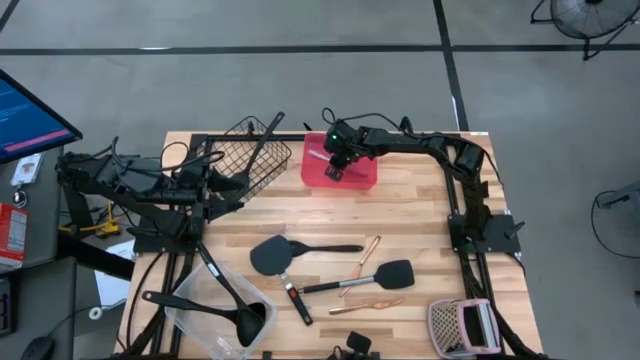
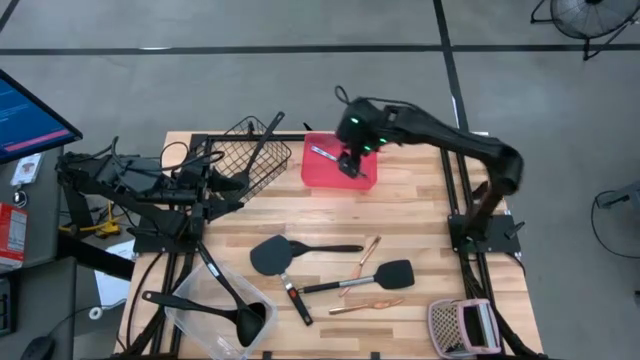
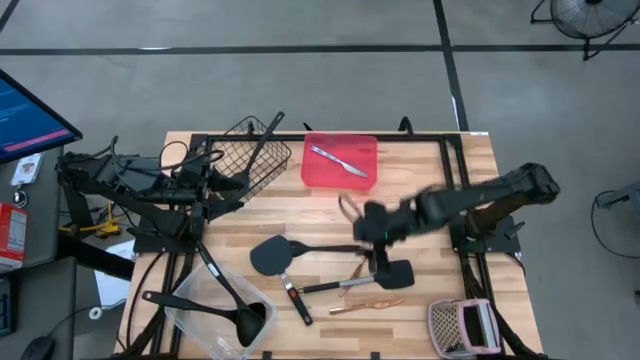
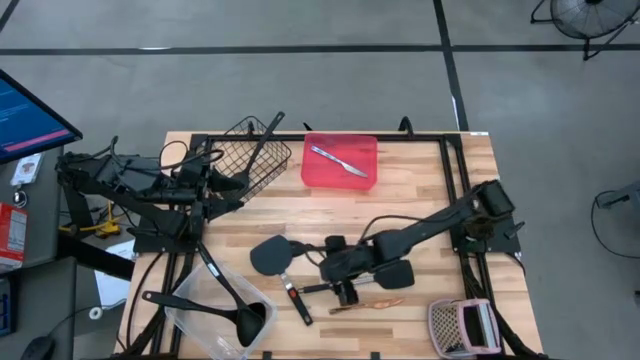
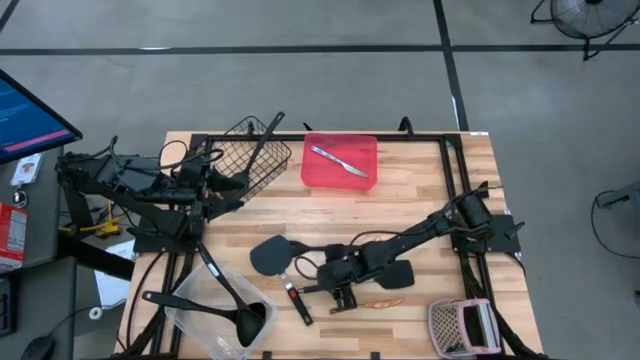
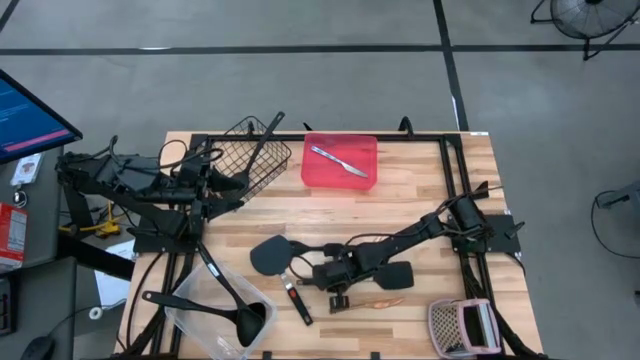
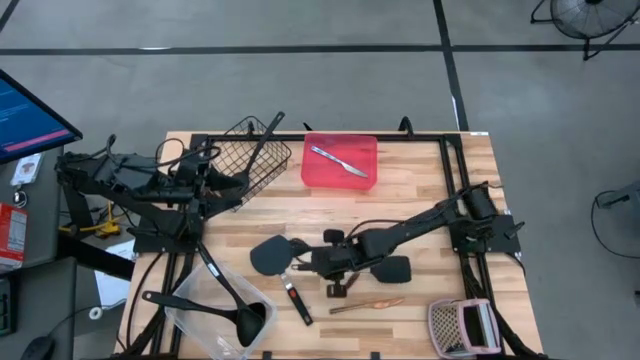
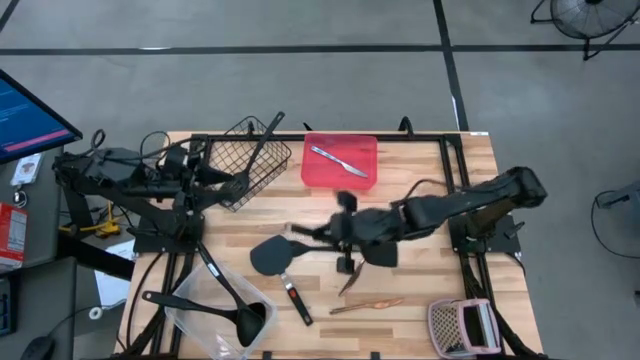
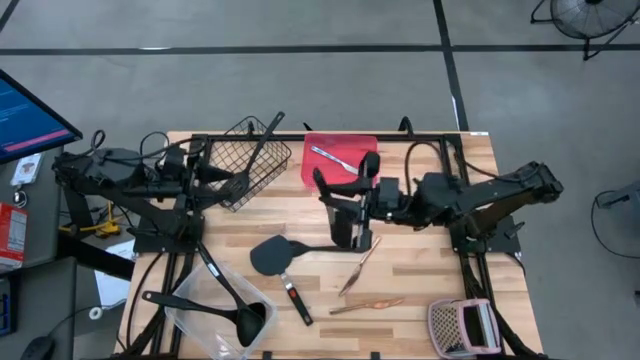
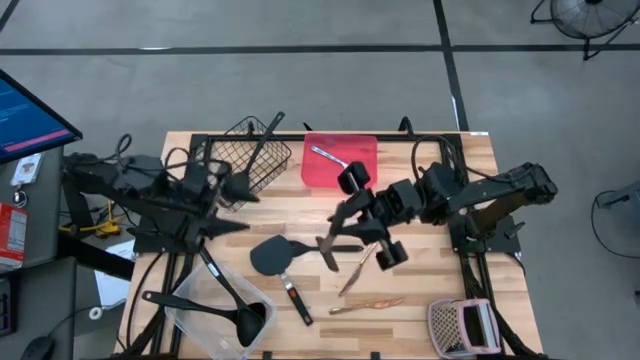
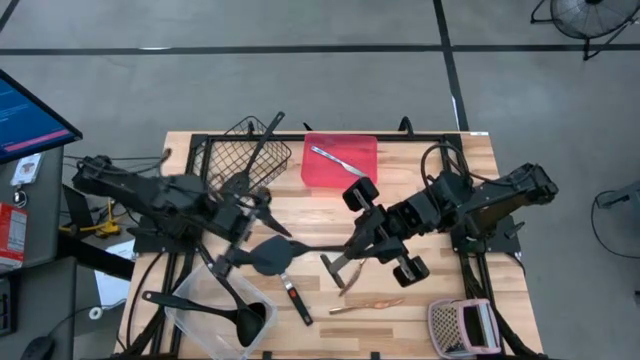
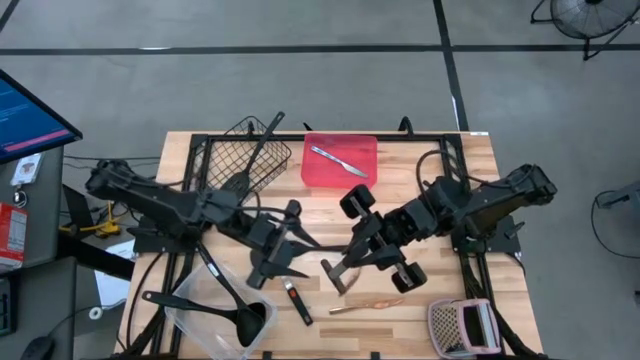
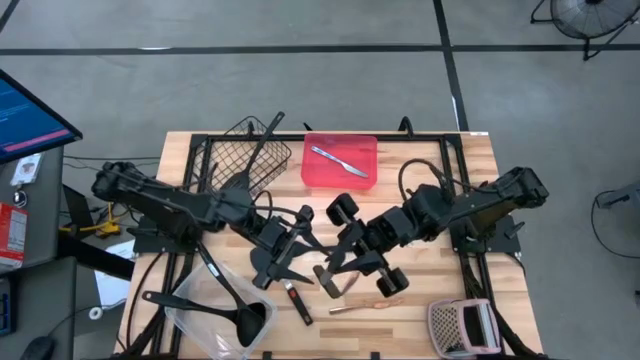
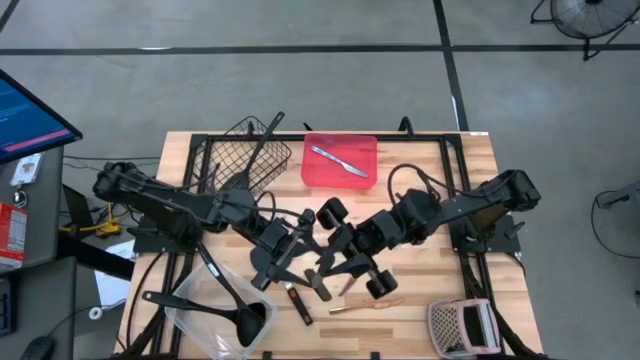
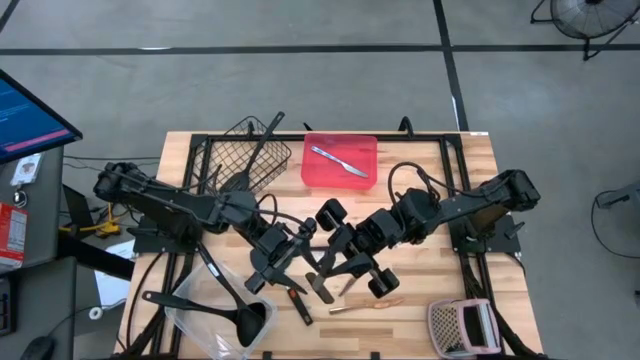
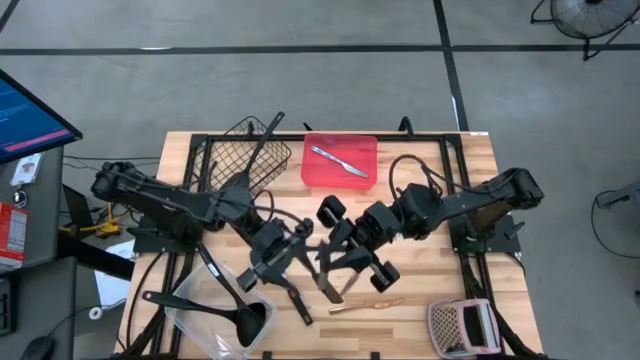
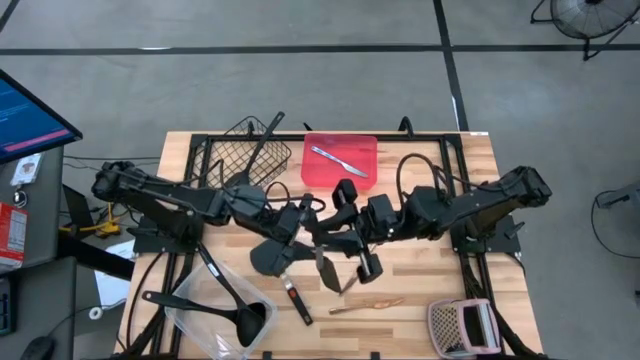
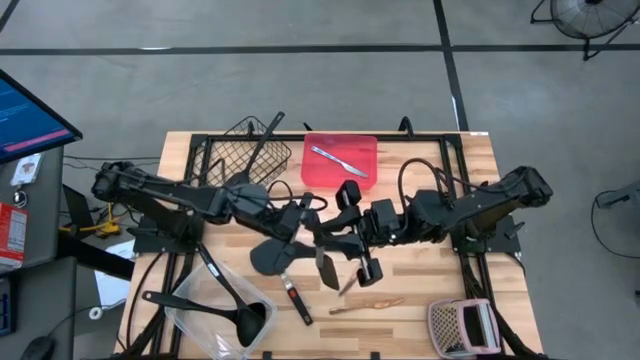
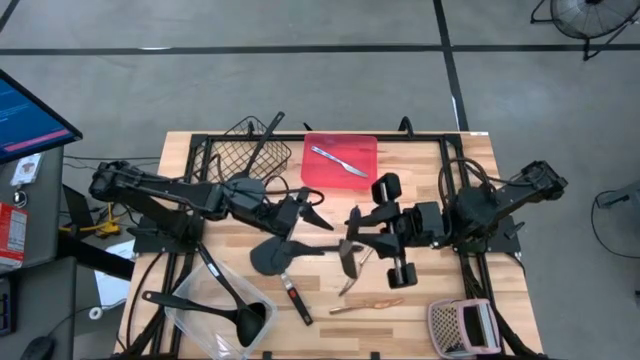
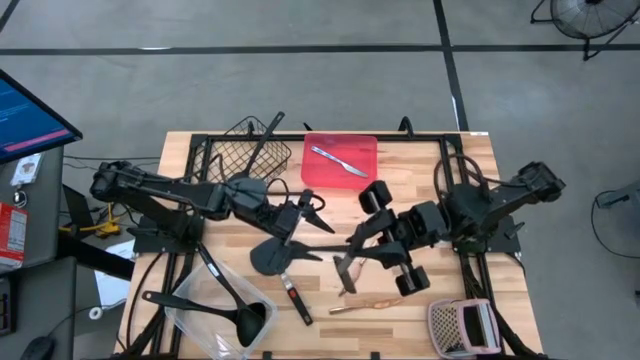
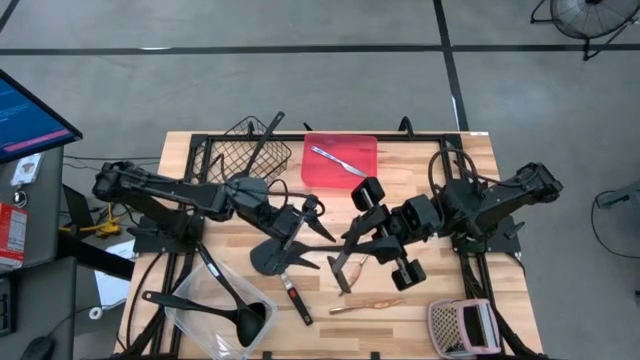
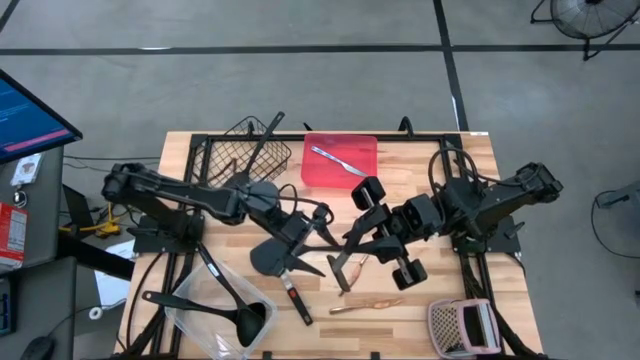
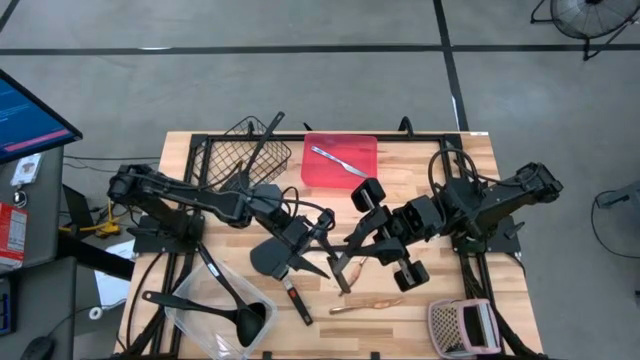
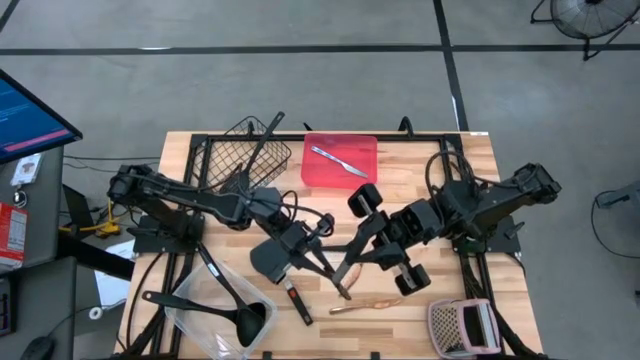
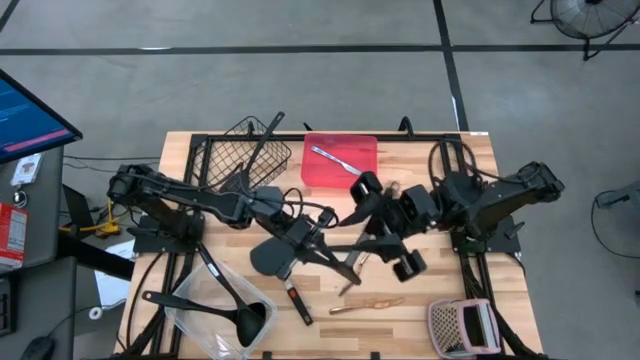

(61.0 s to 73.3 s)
Task: Pick & Place Kitchen Items
Put the spatula into the wire basket

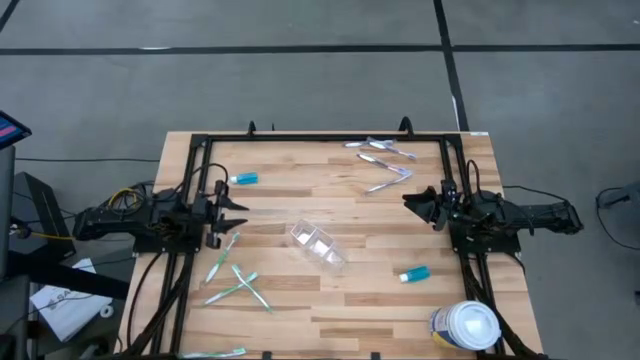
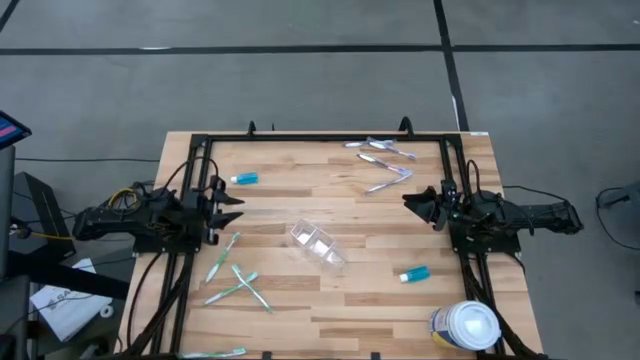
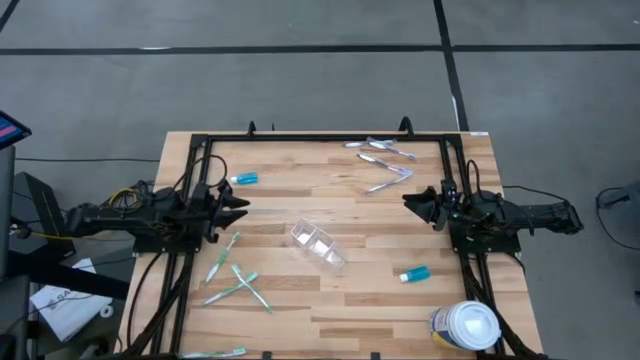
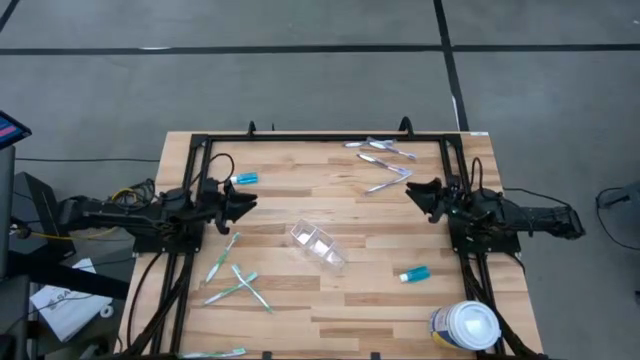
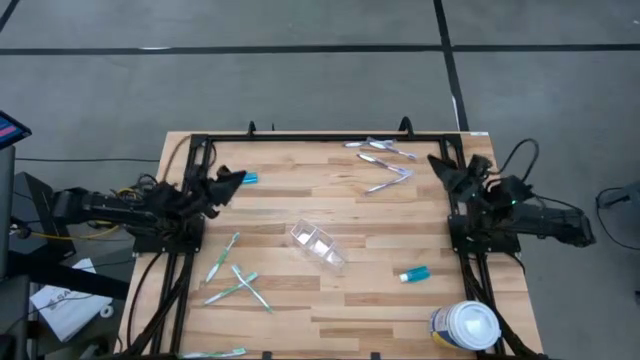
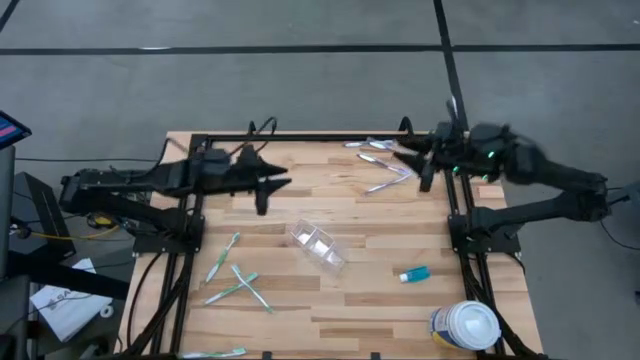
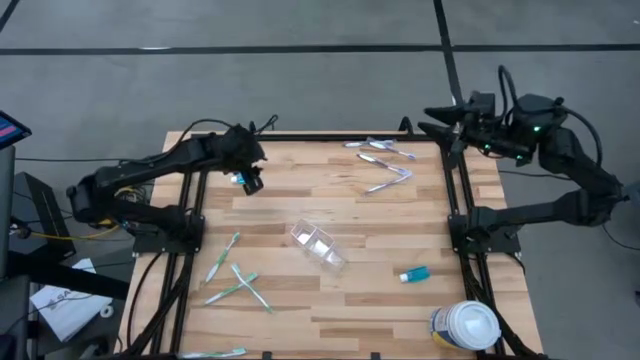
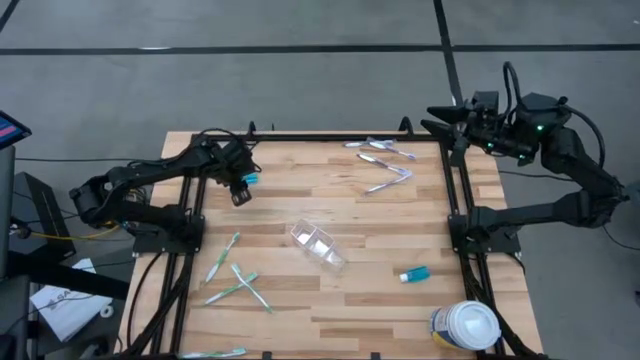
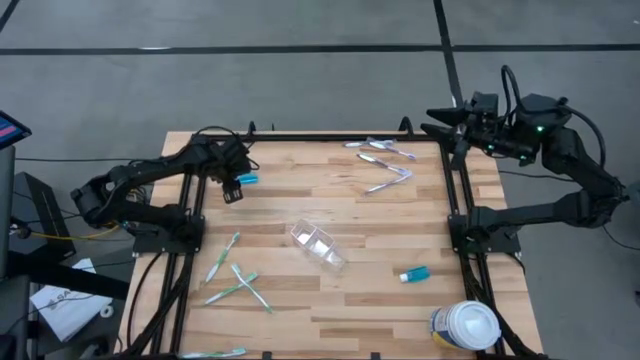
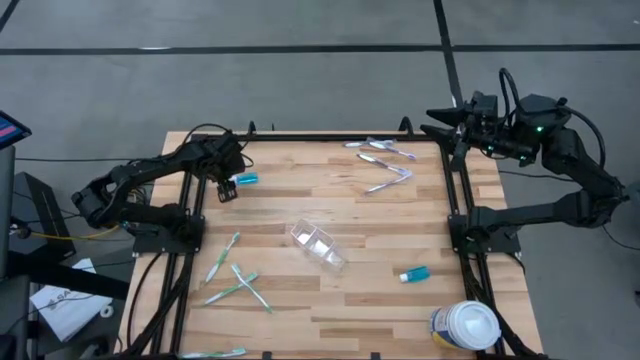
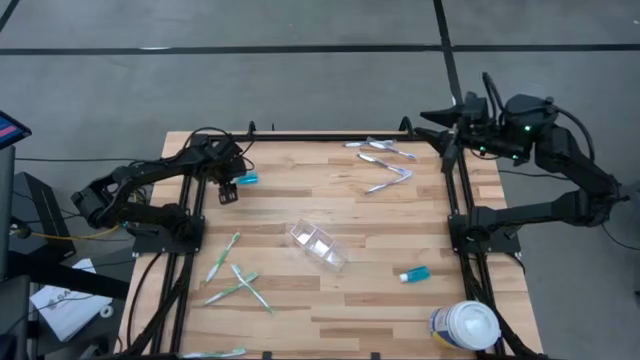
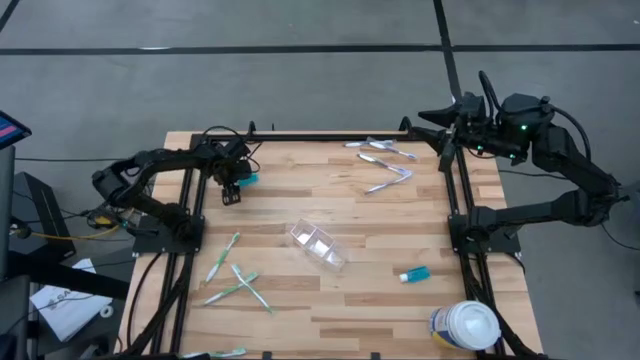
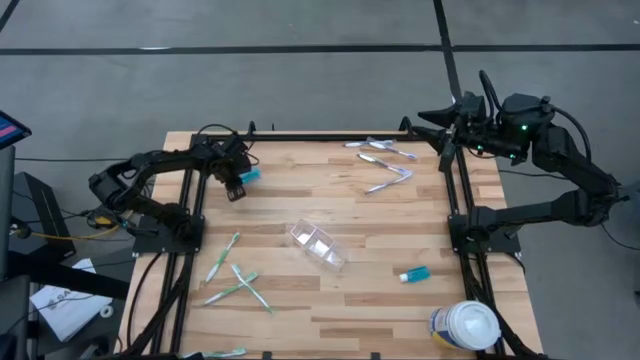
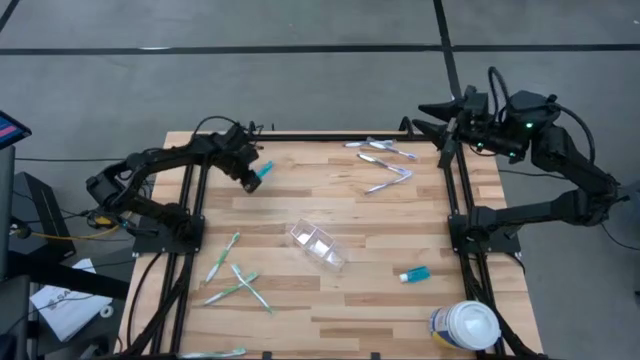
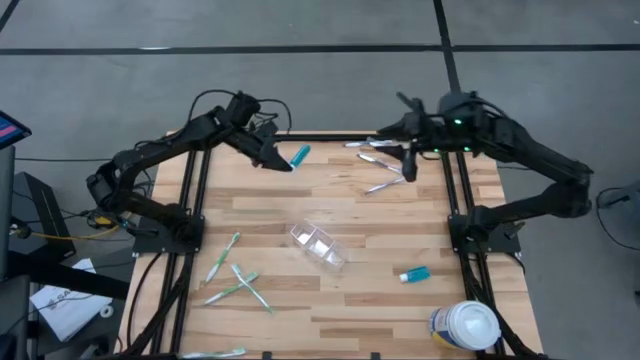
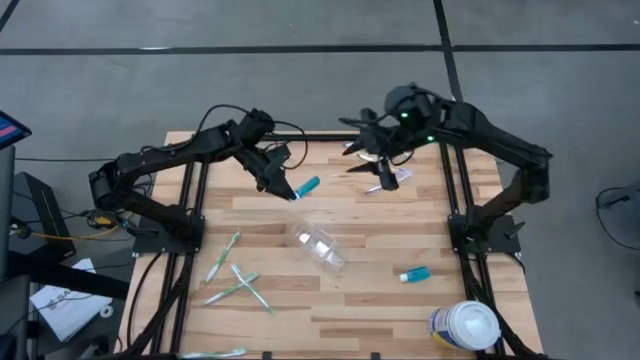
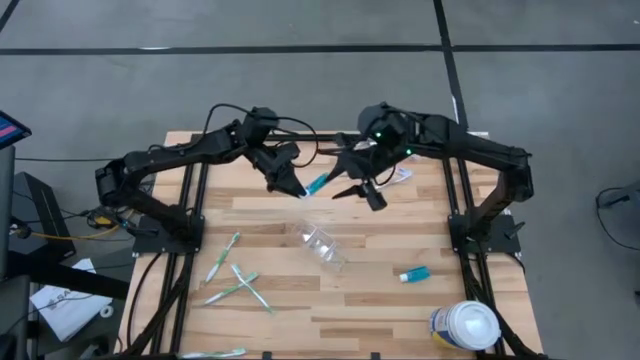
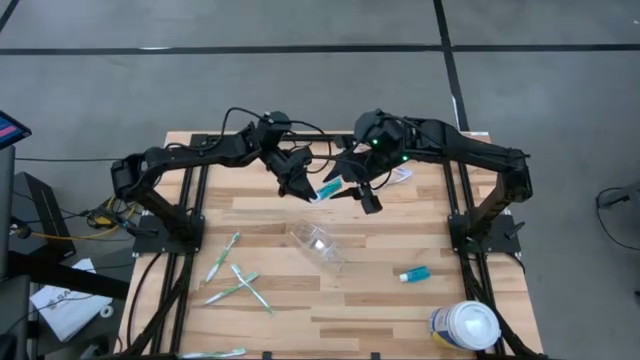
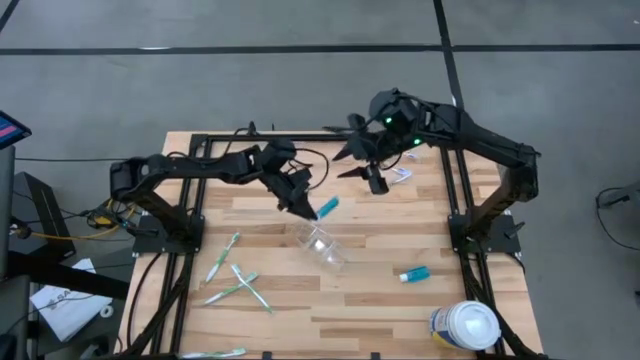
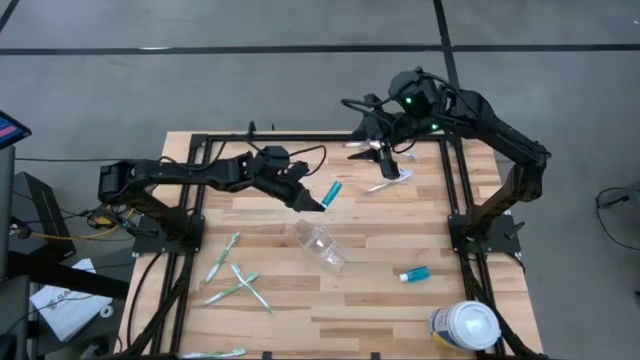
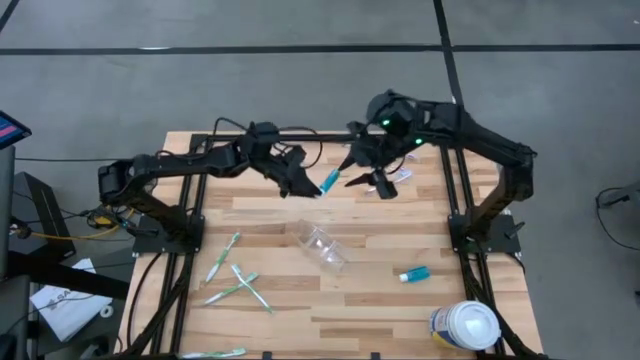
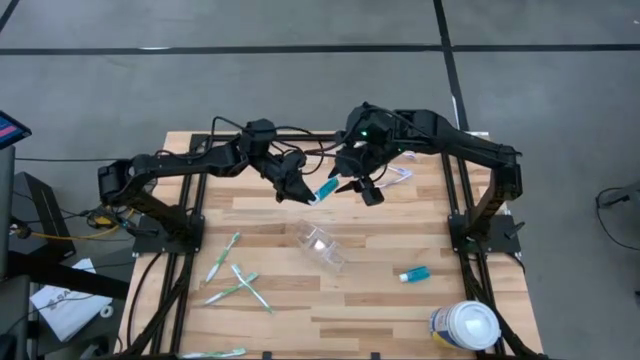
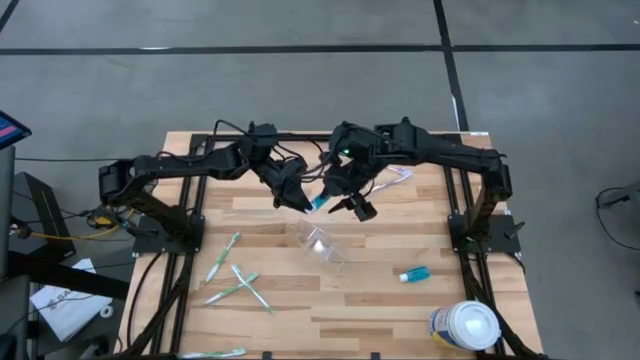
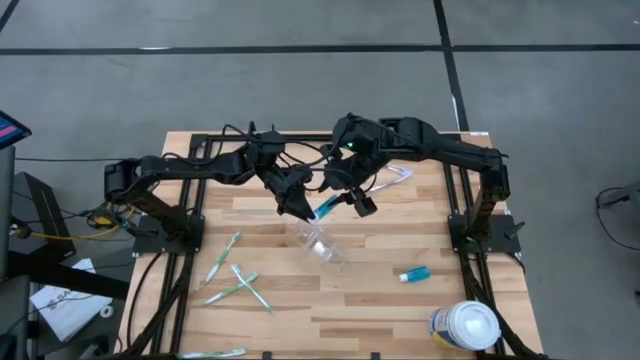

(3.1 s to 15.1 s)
Task: Pick & Place toothbrushing station
Put the blue mouthwash bottle into the transparent organizer
